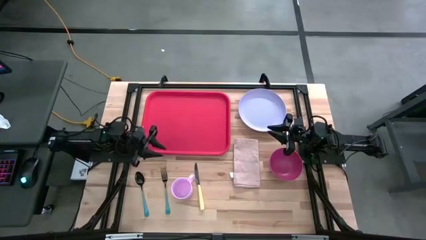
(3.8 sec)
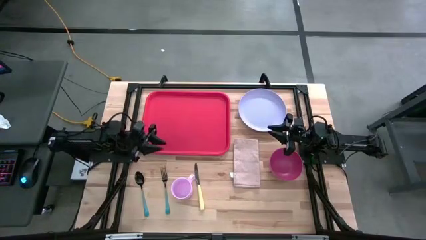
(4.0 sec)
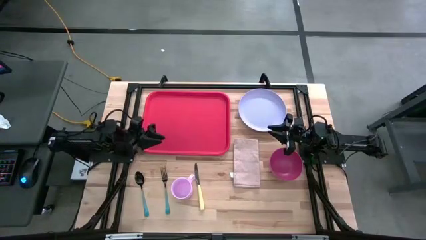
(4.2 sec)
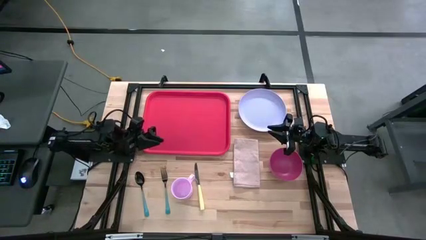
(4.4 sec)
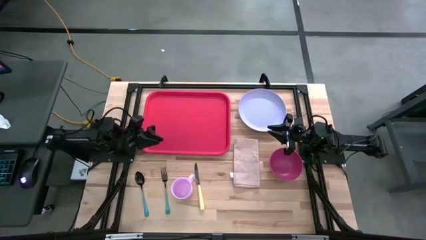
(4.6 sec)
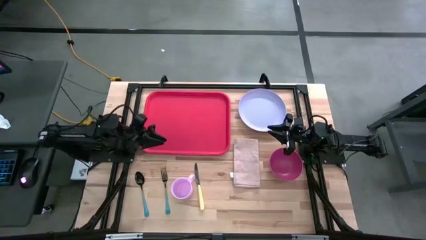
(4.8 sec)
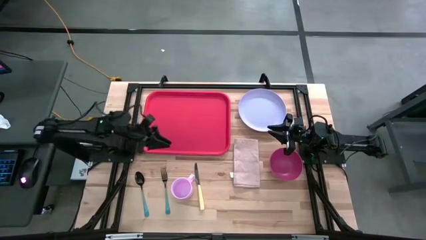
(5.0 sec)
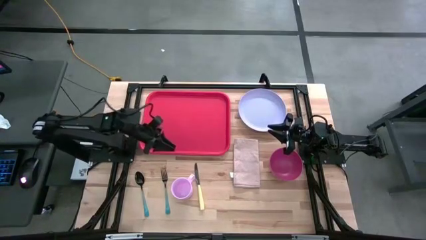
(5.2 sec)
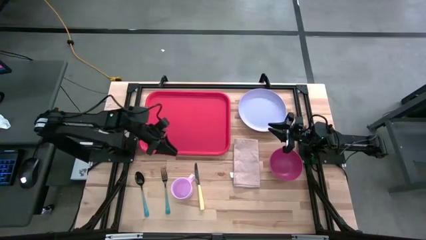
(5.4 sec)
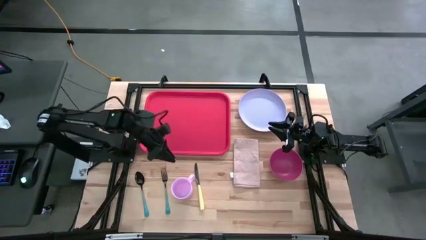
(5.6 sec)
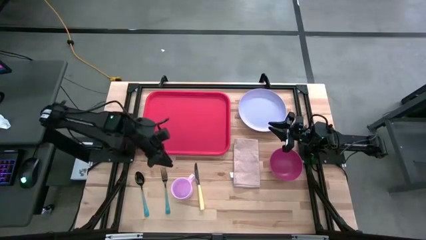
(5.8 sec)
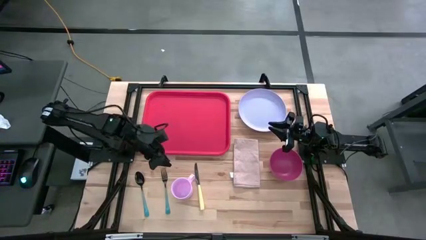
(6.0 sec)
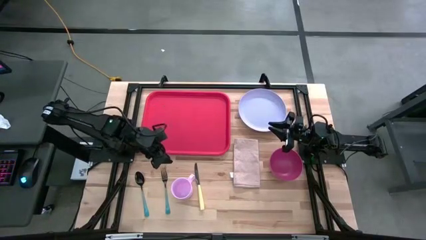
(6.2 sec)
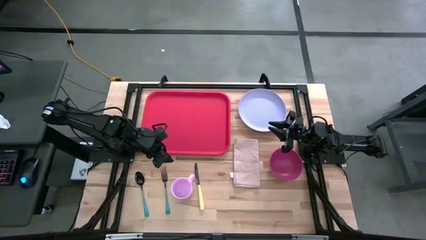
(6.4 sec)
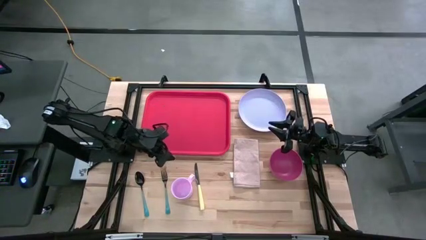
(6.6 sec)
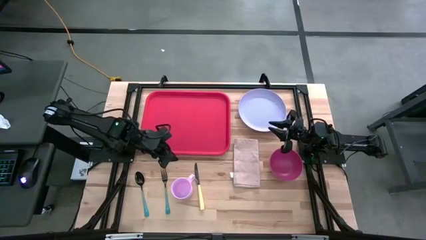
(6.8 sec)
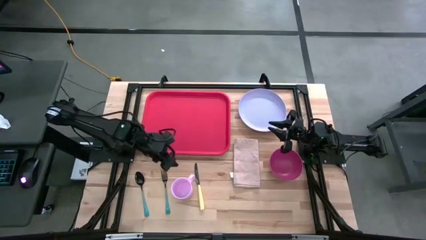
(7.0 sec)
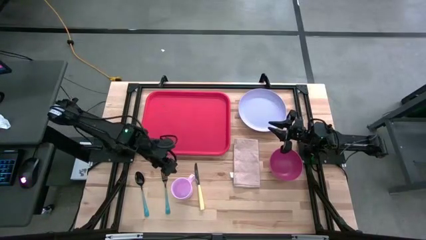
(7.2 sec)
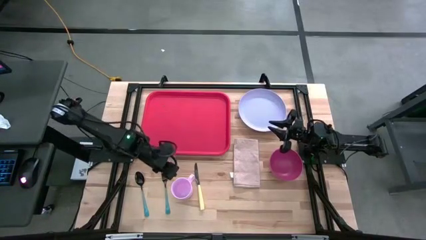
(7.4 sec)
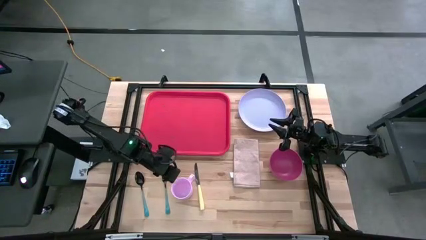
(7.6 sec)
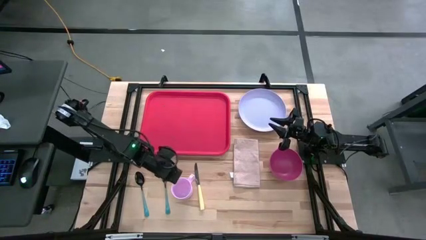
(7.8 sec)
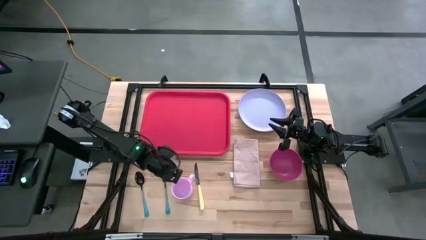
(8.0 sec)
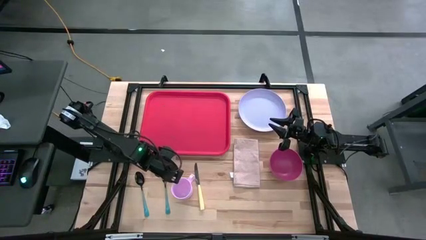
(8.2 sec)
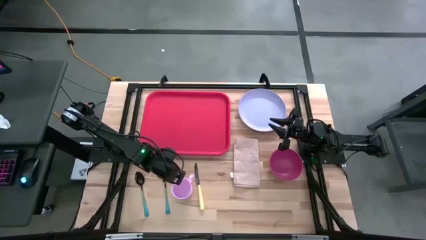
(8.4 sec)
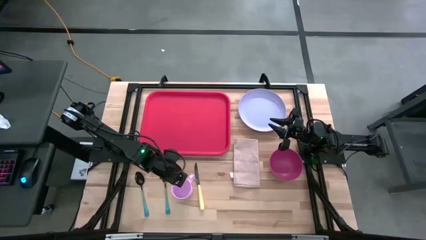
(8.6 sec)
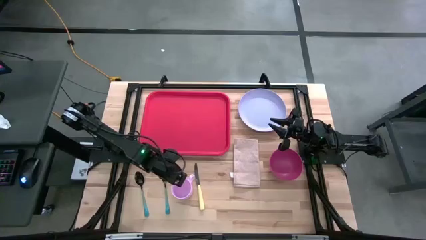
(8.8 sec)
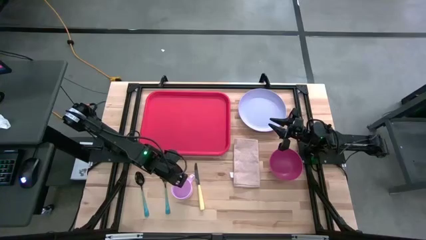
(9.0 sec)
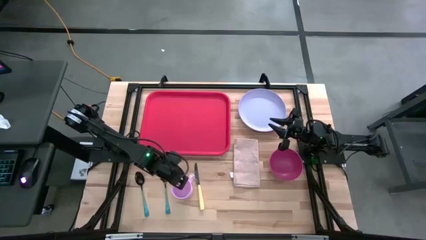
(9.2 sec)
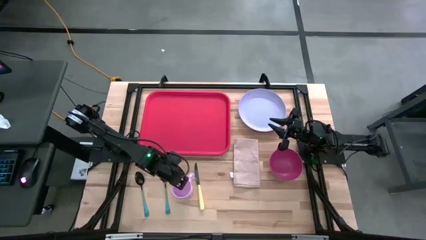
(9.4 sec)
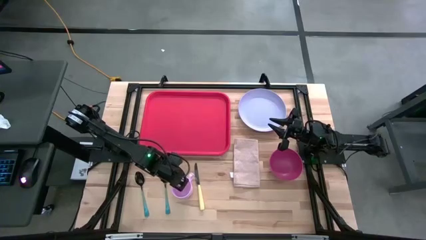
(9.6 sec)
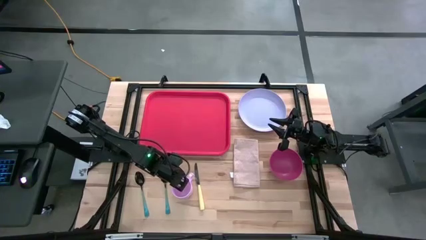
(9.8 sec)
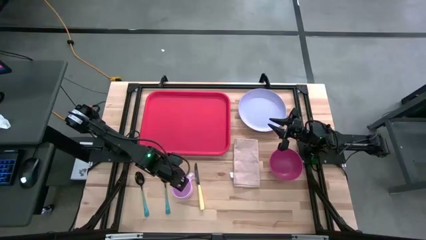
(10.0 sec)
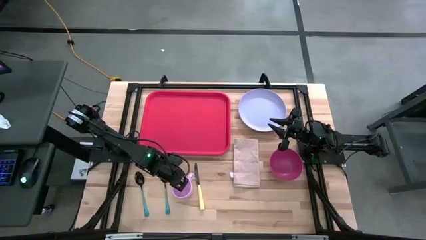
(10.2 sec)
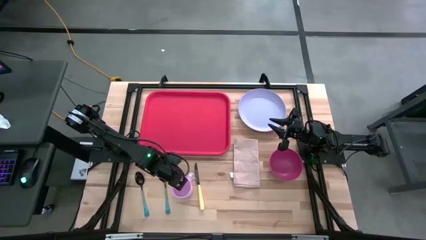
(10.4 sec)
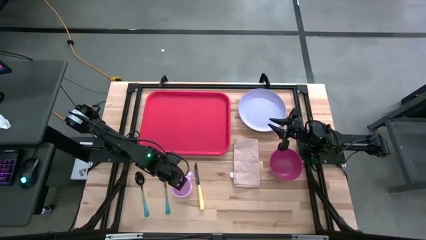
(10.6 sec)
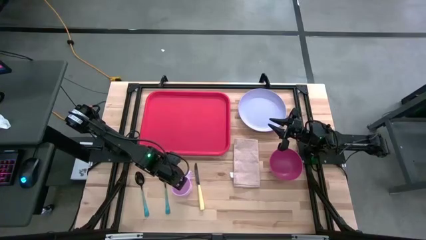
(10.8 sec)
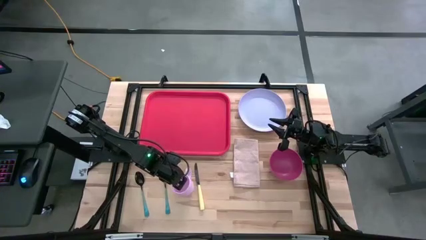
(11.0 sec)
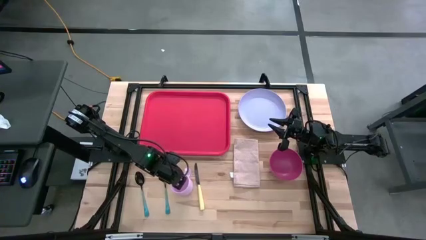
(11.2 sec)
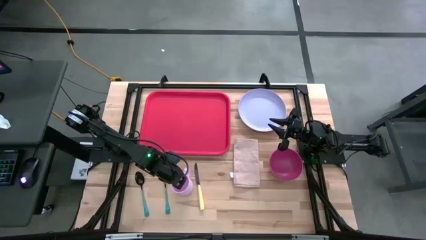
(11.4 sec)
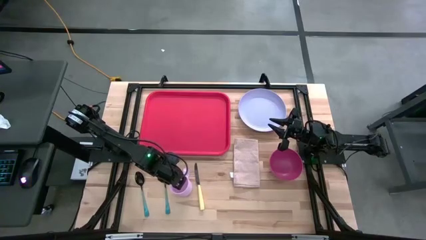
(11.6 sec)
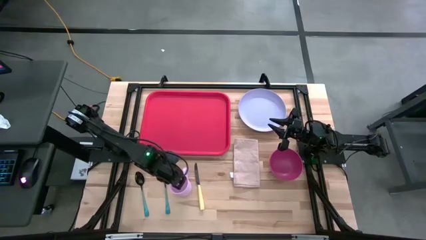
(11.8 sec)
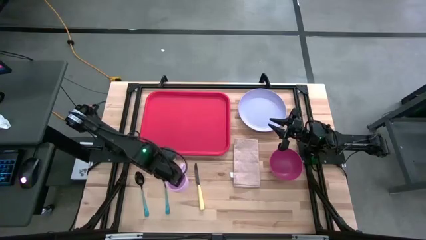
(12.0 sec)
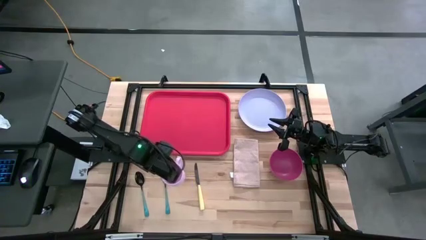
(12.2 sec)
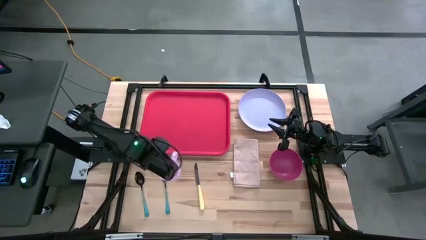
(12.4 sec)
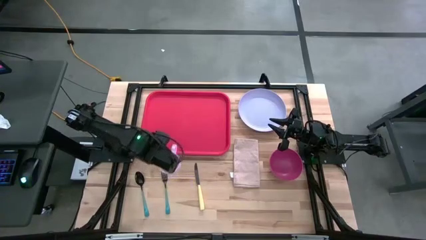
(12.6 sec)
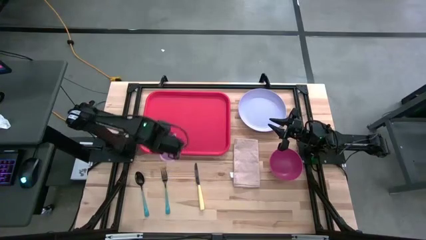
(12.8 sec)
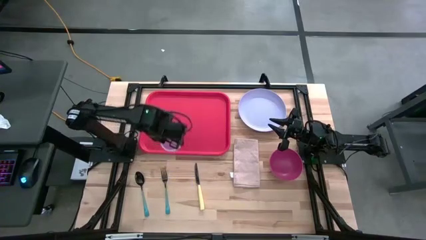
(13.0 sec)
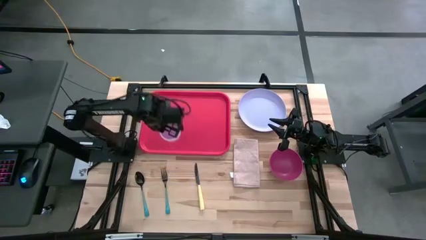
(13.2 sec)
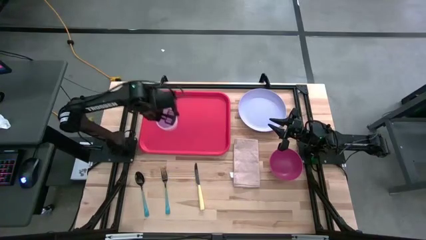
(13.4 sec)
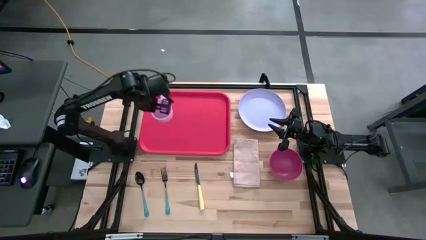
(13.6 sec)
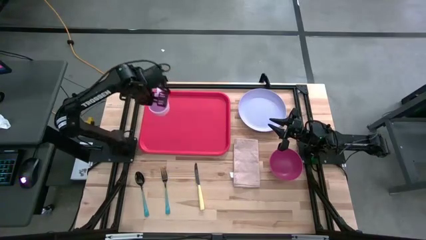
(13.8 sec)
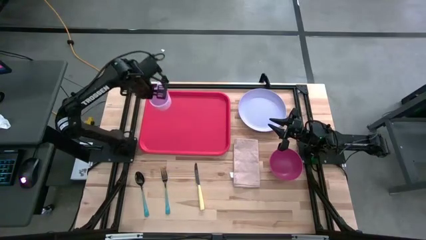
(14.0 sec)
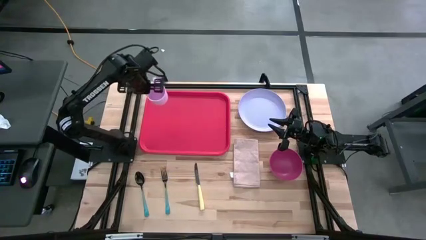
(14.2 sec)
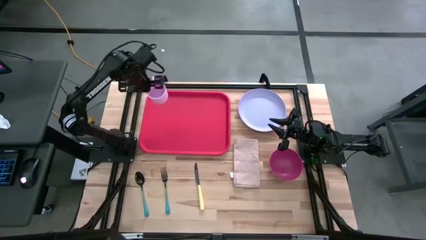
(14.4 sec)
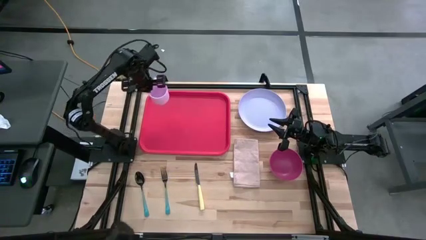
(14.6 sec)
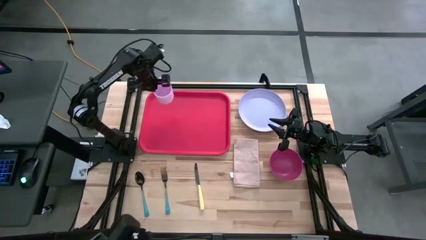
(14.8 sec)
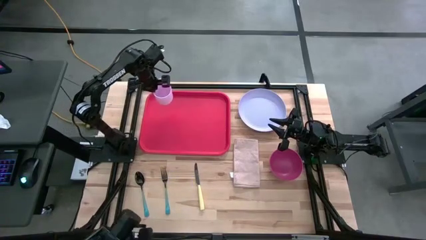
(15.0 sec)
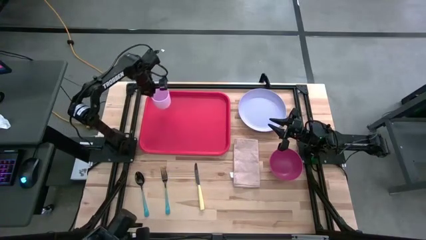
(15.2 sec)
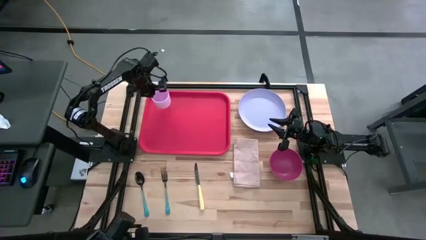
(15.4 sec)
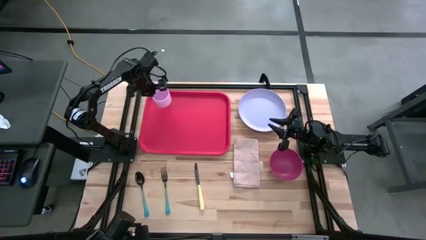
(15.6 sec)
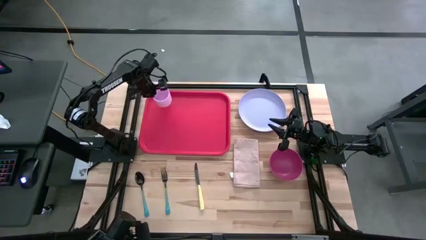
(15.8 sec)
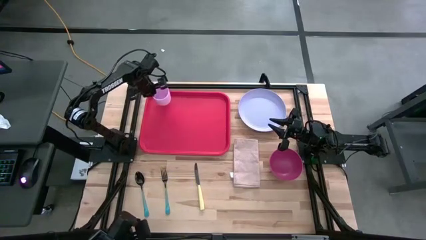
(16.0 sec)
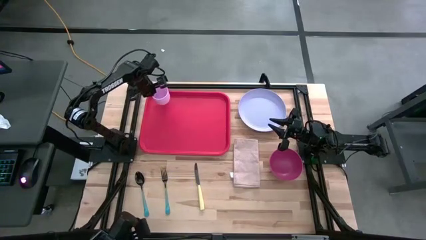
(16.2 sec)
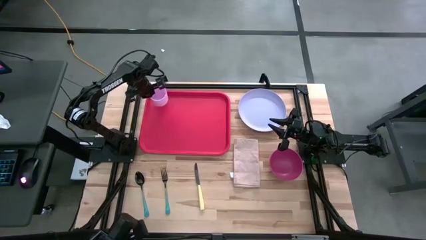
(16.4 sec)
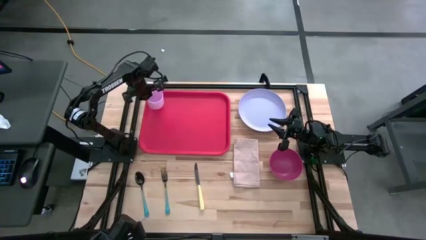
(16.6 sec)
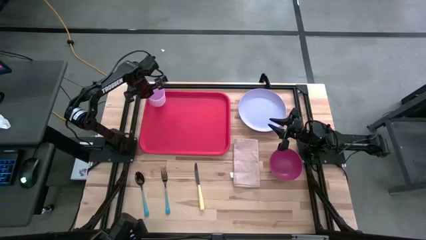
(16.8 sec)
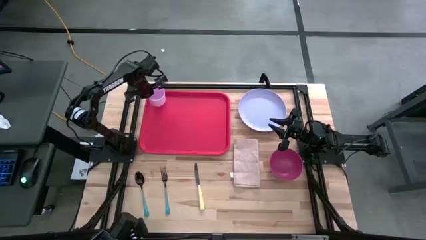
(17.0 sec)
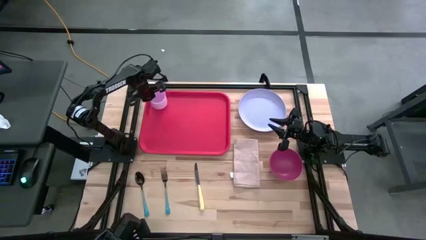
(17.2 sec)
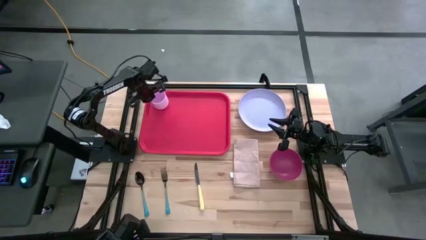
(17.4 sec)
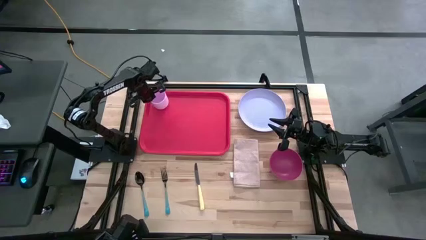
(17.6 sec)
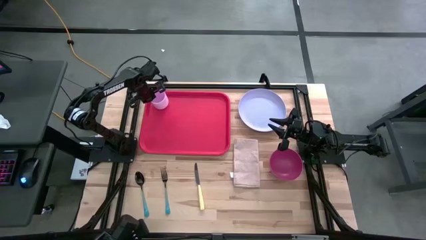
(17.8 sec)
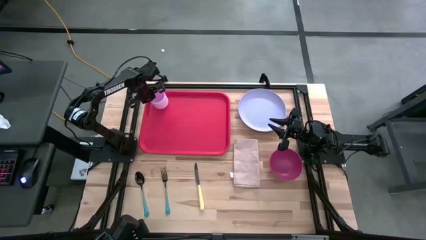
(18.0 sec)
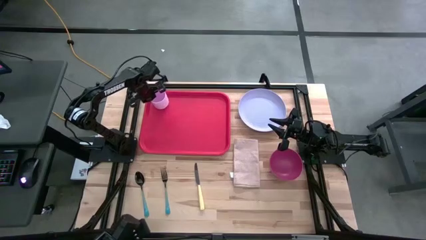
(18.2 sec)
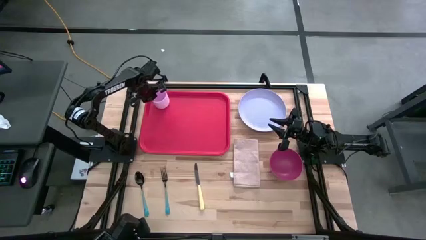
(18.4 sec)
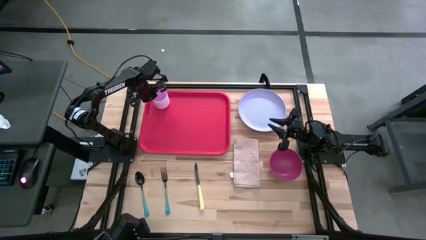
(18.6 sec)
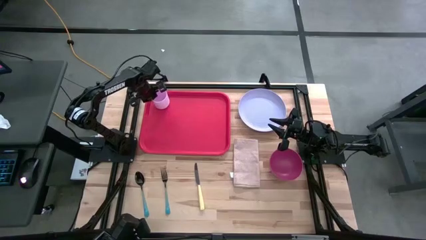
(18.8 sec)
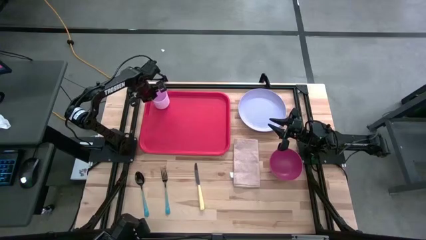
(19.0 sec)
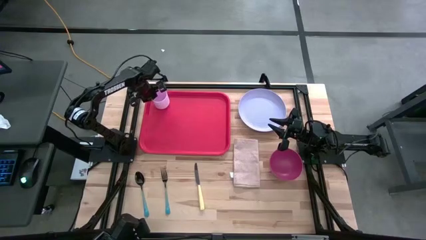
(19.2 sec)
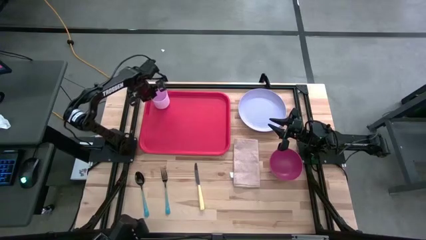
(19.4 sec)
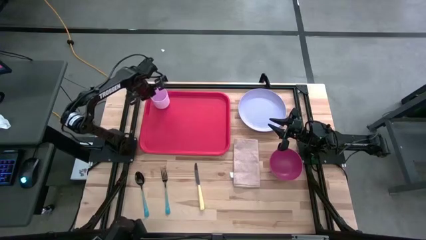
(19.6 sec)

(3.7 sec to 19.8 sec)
Task: Set up tray
Put the pink mug at the top left of the red tray
